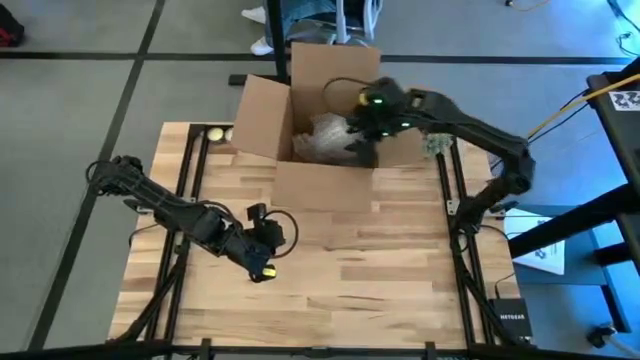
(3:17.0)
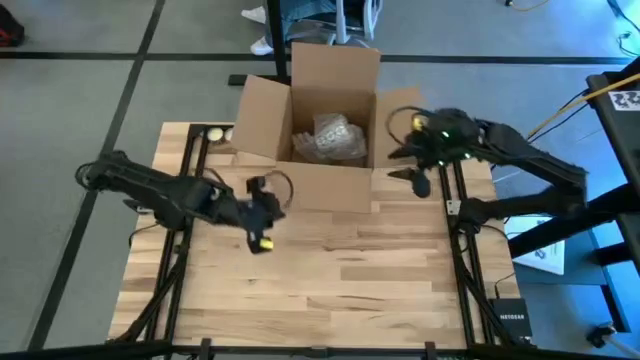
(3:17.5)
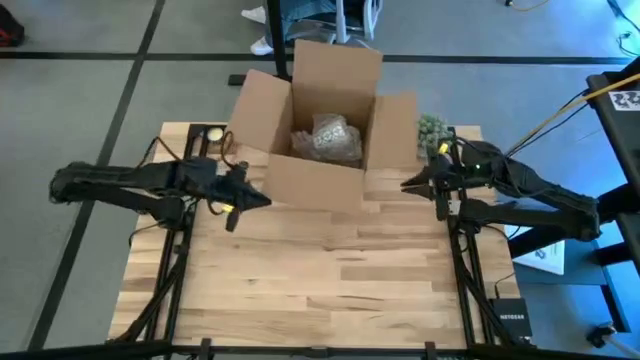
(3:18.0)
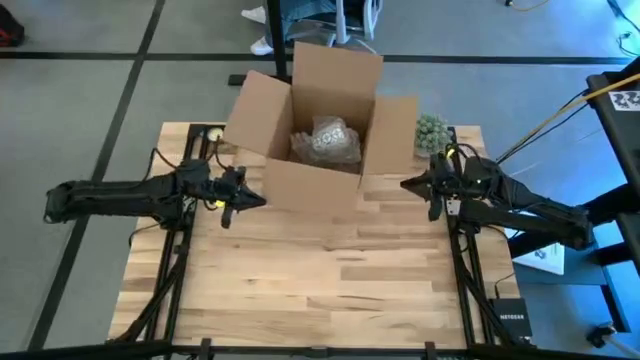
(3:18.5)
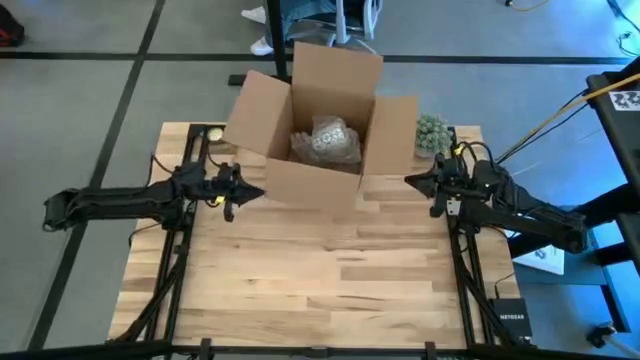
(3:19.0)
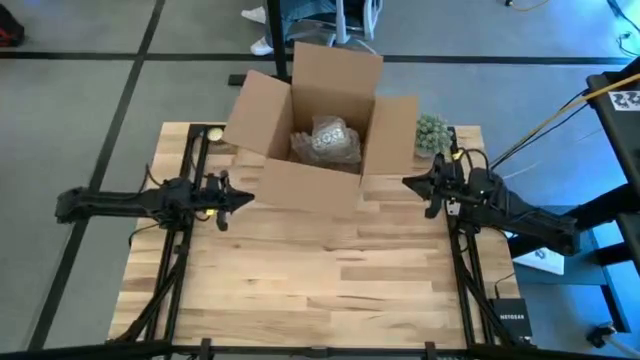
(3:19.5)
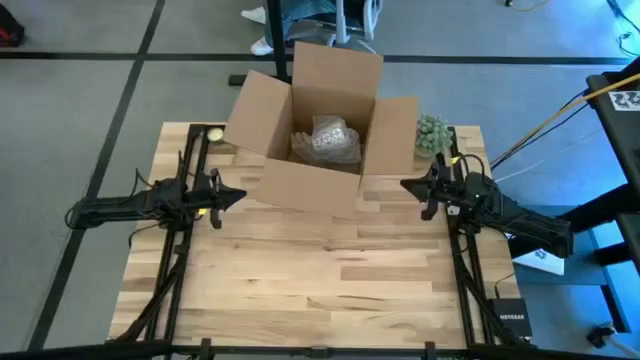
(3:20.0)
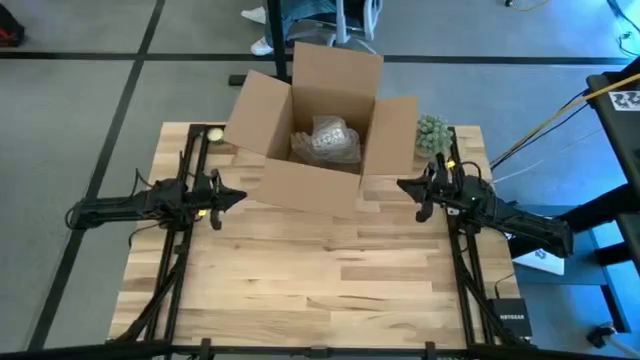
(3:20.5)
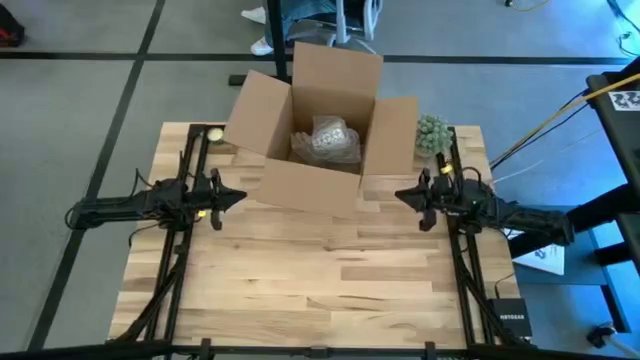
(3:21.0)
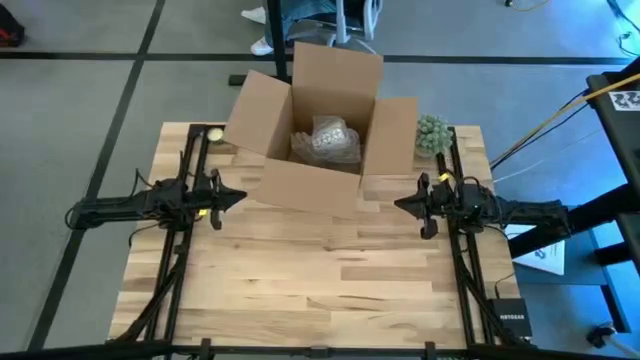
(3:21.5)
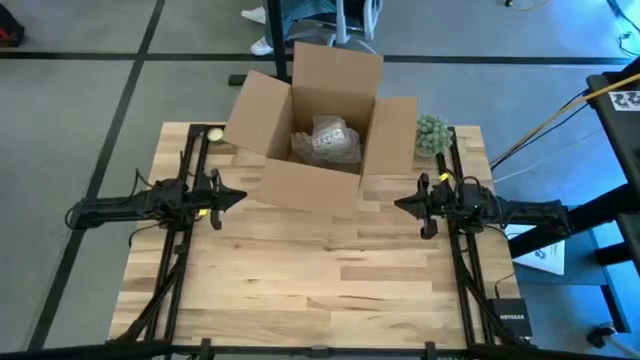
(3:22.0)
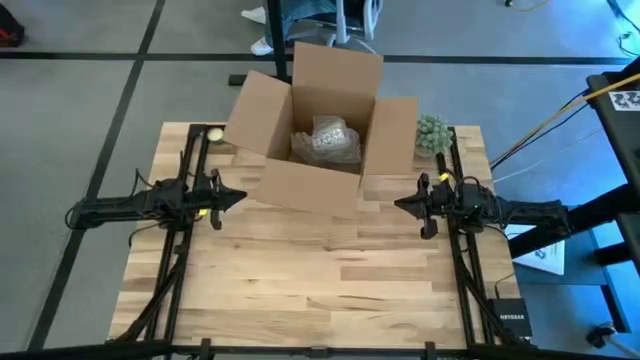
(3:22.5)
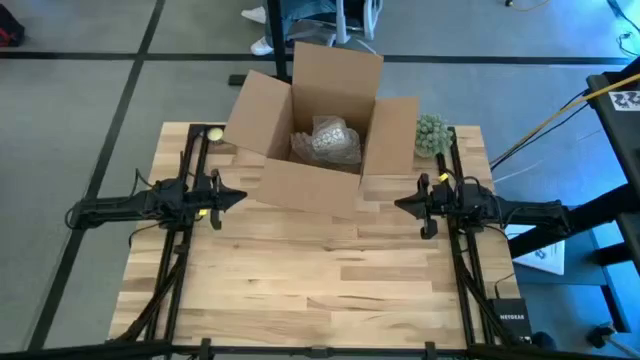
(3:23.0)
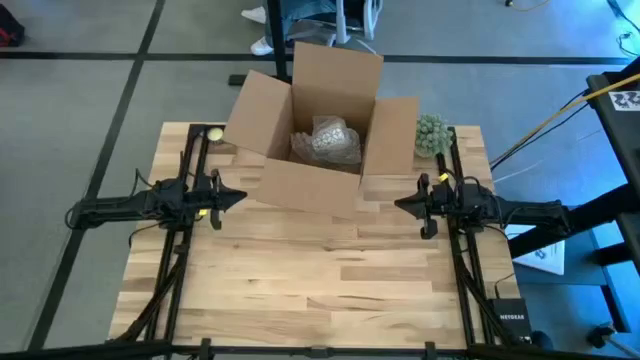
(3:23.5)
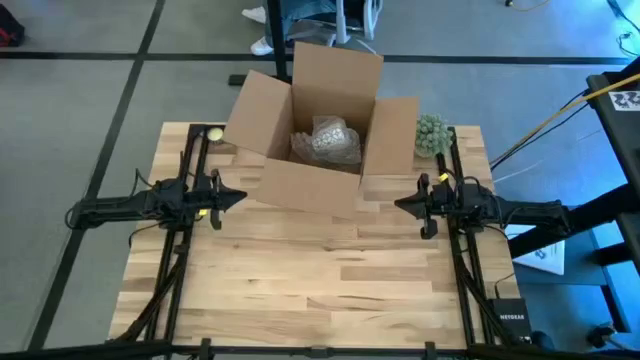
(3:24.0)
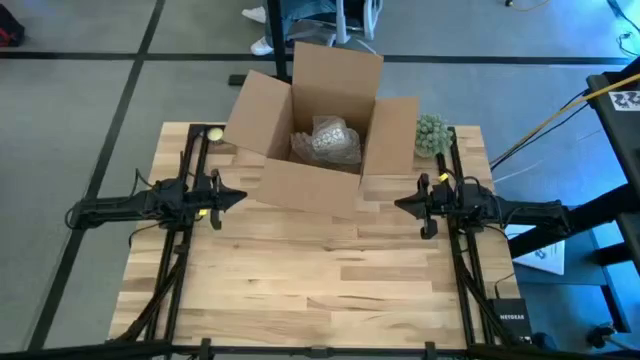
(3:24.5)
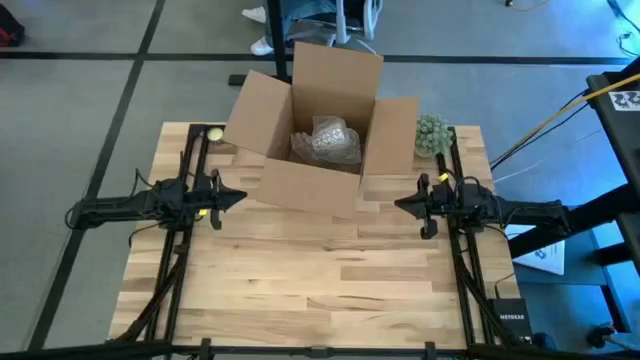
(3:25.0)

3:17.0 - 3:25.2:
Task: wrap mug
Return to Home Position

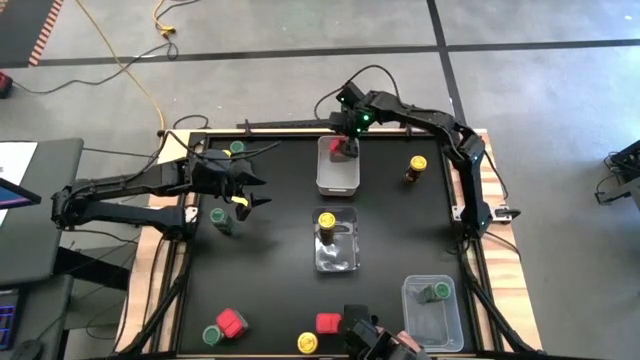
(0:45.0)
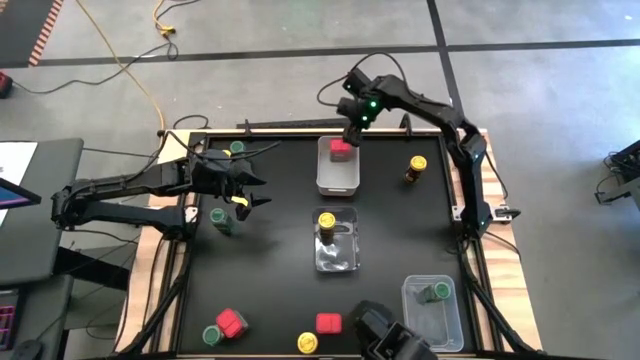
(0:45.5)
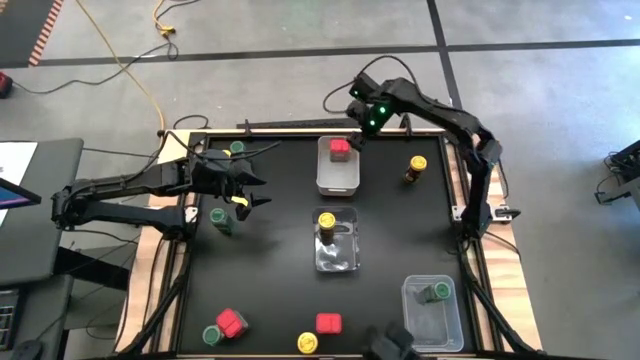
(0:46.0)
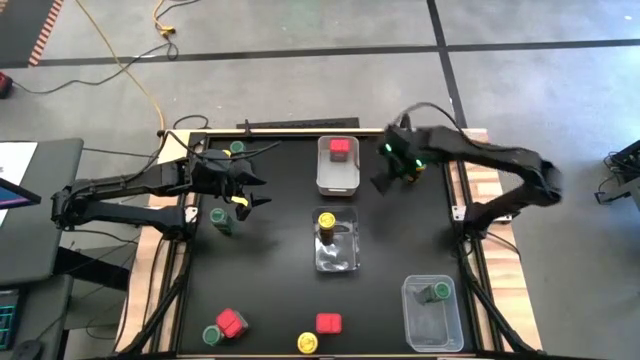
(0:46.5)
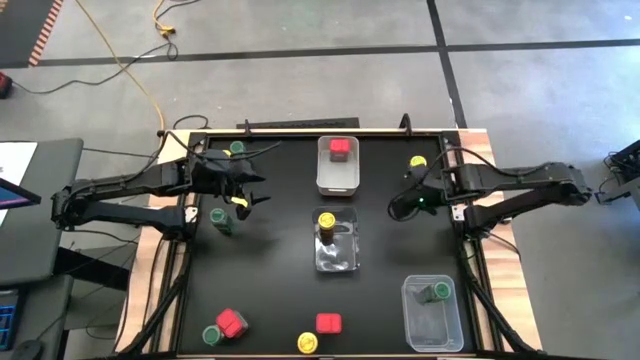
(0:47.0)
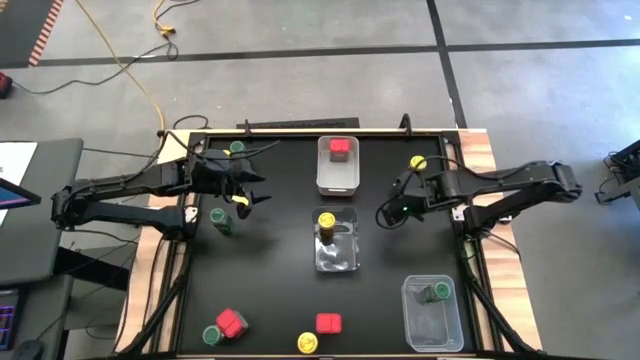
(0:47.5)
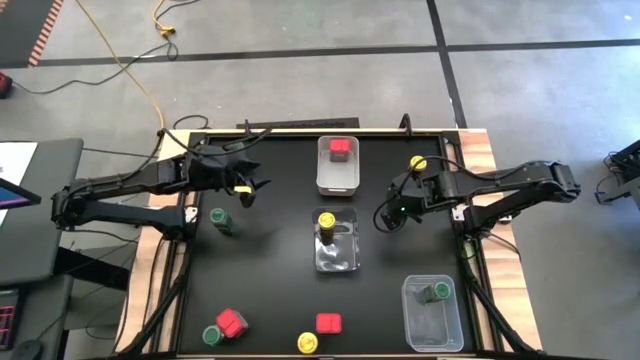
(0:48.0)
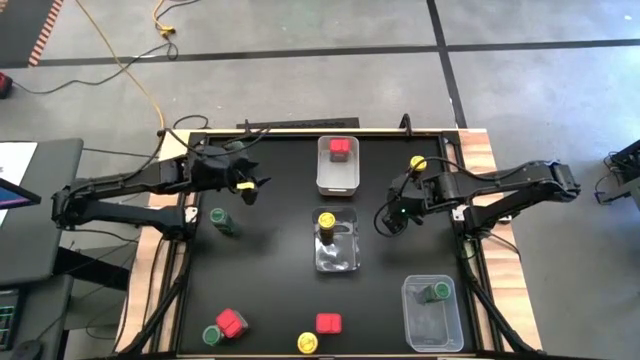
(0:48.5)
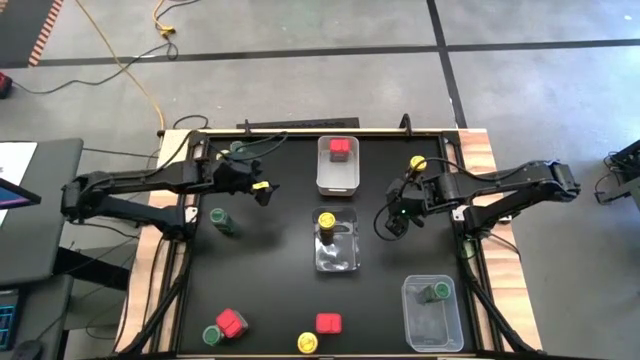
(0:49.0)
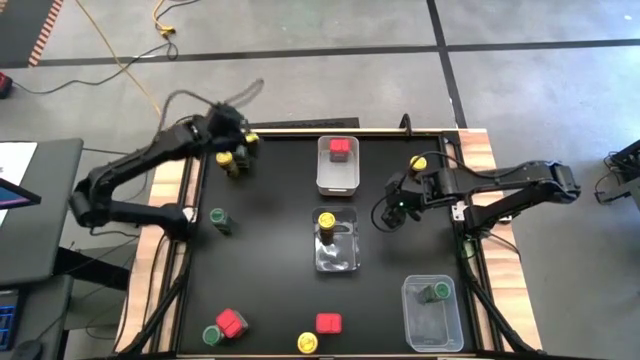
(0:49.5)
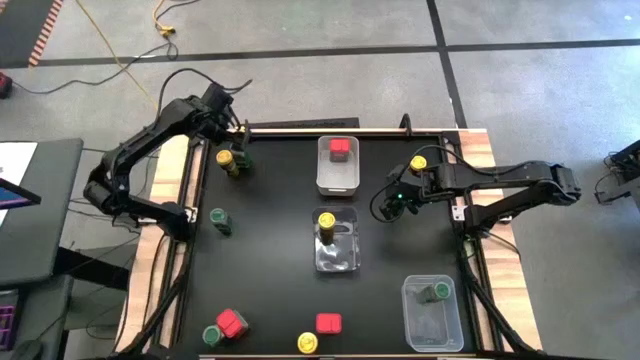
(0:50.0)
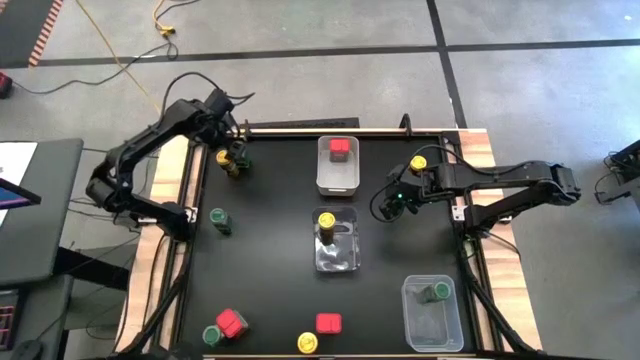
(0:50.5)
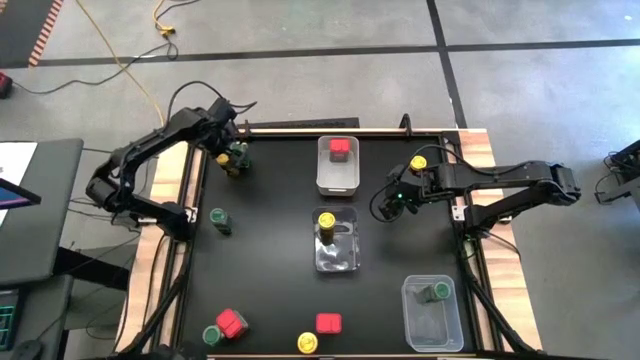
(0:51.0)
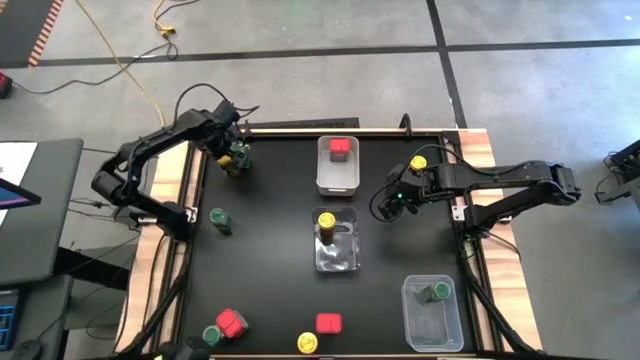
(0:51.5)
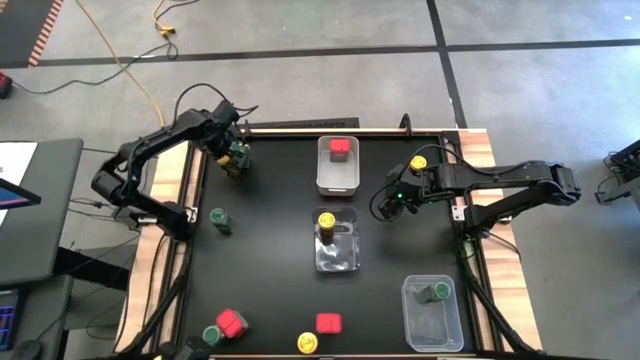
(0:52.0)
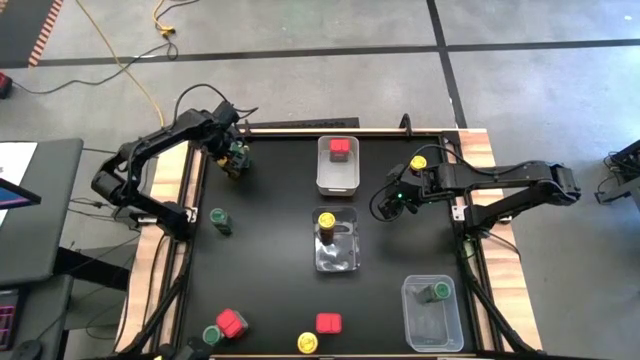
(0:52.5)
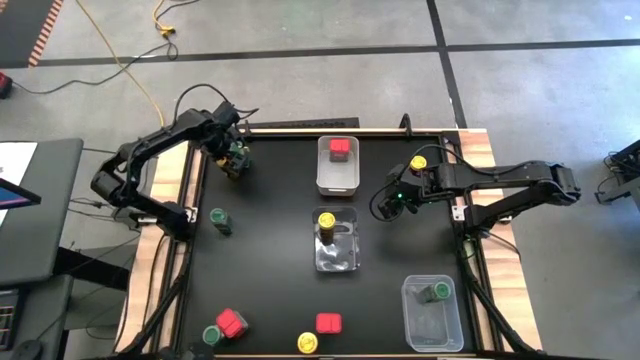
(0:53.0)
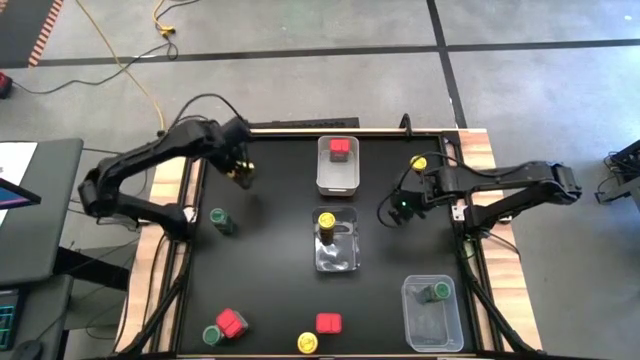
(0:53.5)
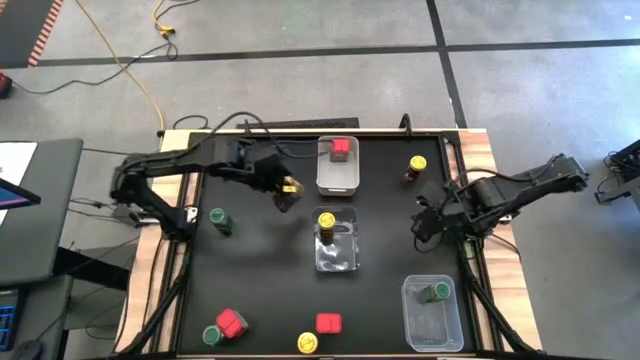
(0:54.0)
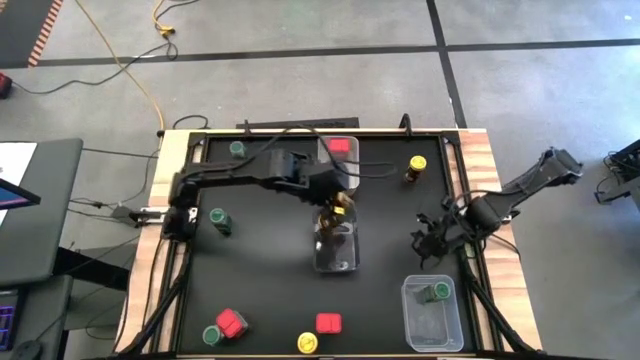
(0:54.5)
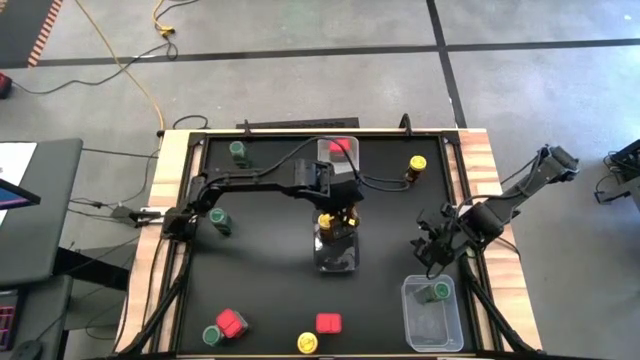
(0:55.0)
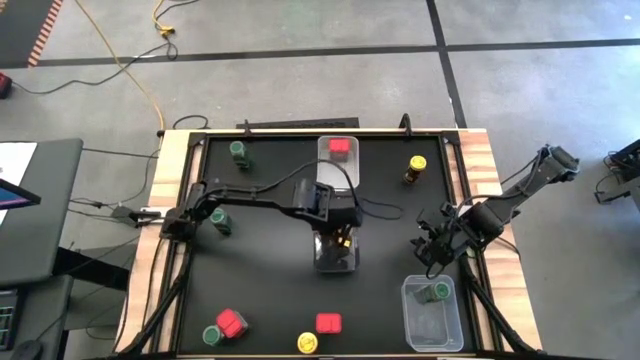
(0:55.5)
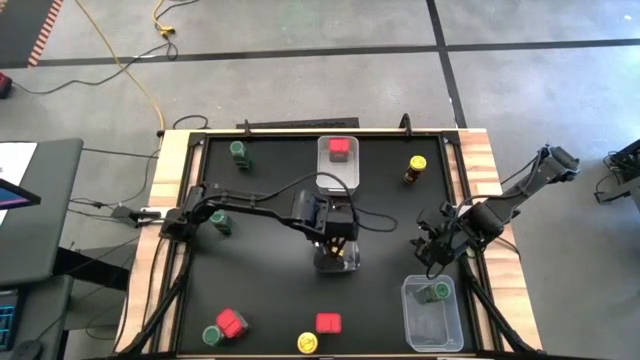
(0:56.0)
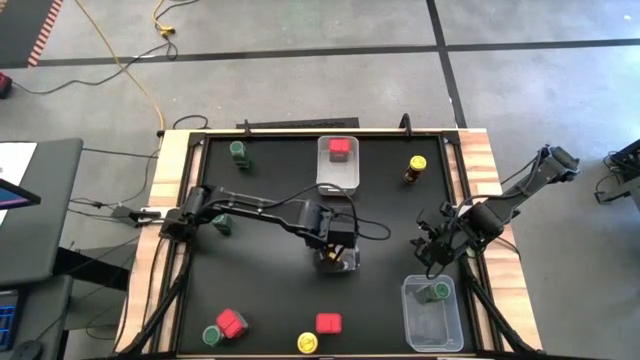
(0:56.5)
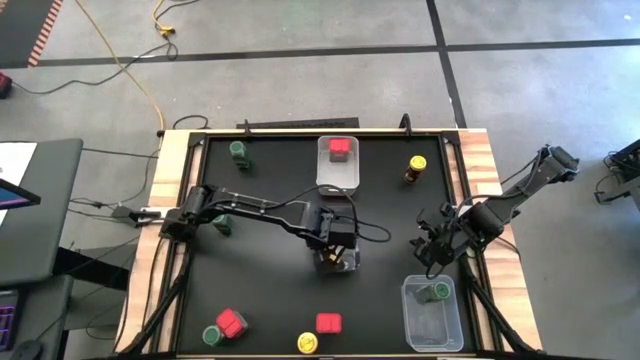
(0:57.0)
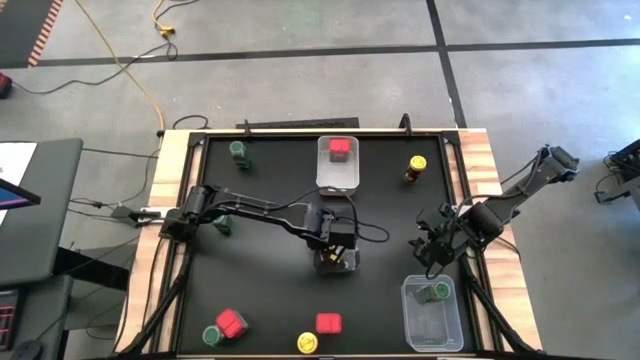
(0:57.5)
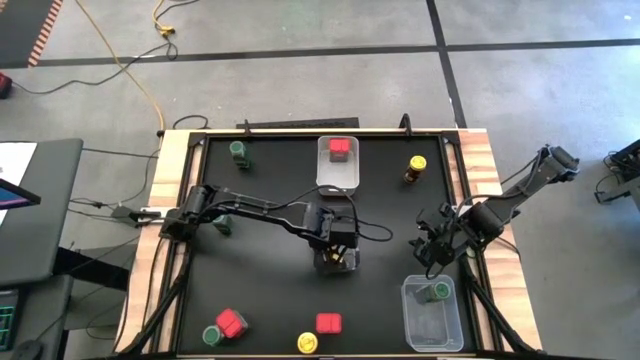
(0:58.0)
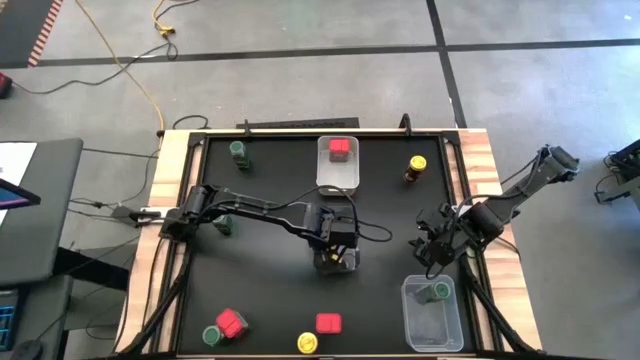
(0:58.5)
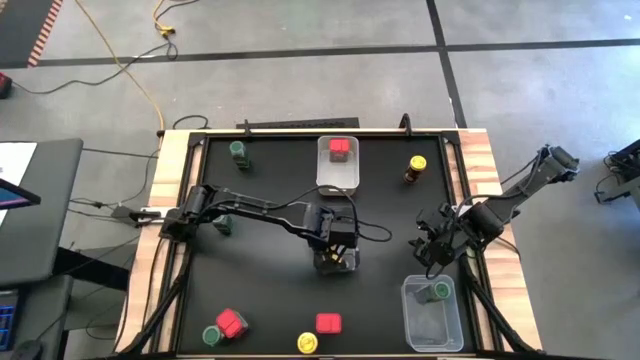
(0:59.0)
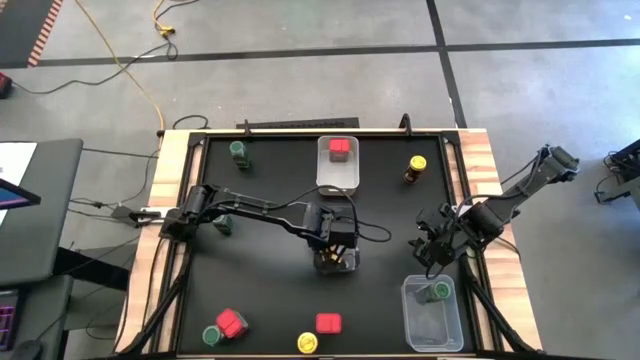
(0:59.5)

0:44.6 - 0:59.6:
Task: Sort spices by type
Put the top left yellow seasoning bottle into the black bin
